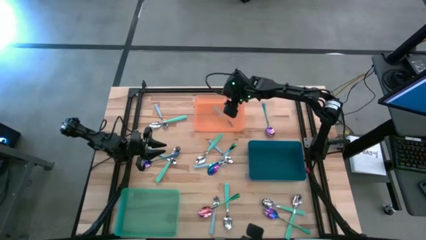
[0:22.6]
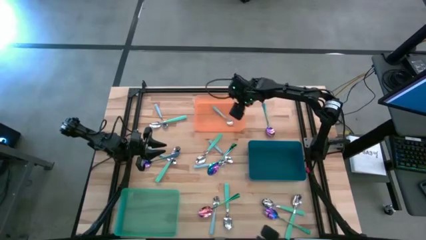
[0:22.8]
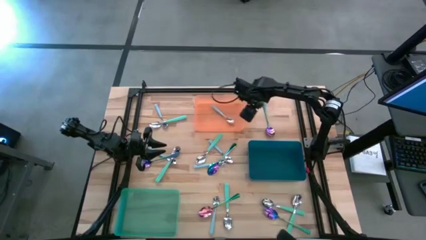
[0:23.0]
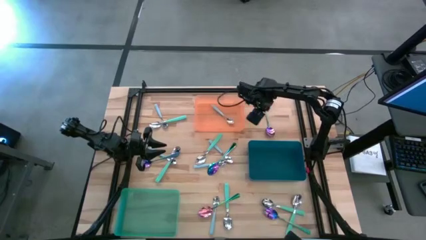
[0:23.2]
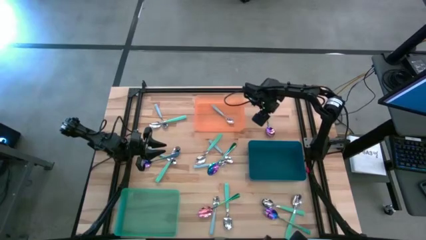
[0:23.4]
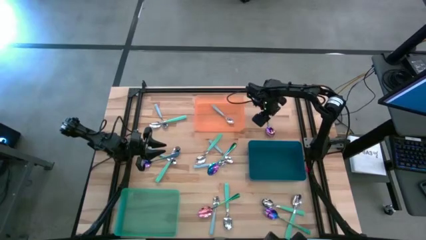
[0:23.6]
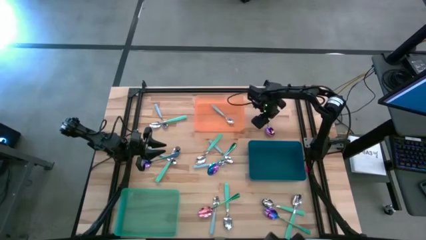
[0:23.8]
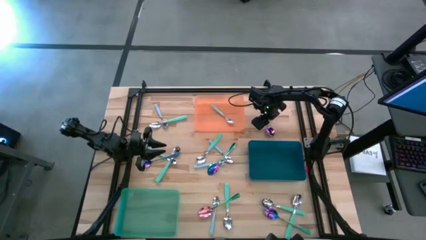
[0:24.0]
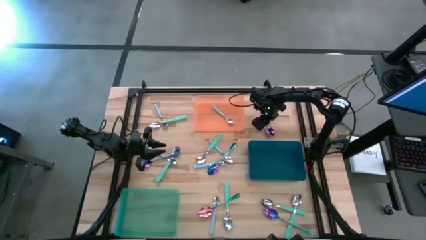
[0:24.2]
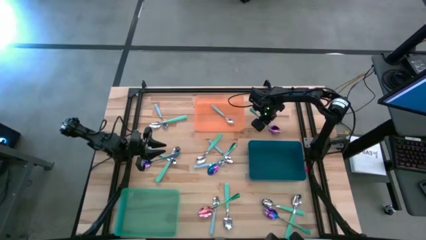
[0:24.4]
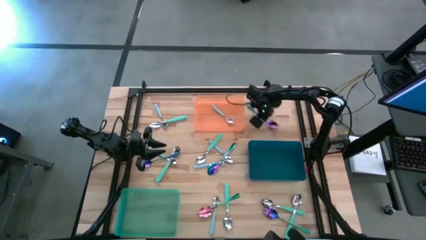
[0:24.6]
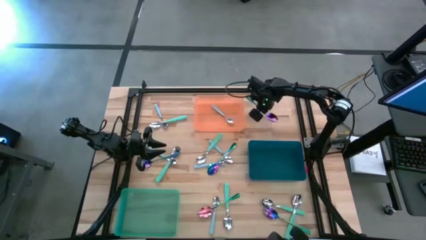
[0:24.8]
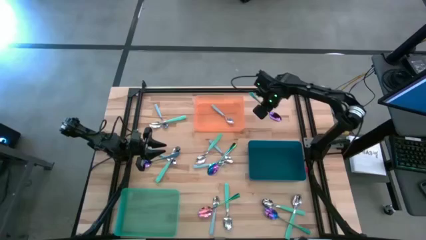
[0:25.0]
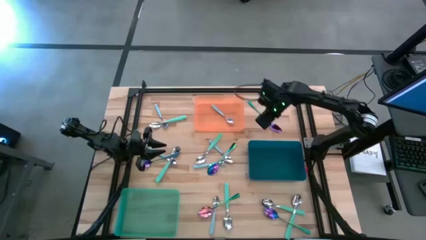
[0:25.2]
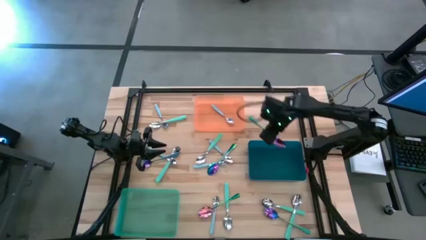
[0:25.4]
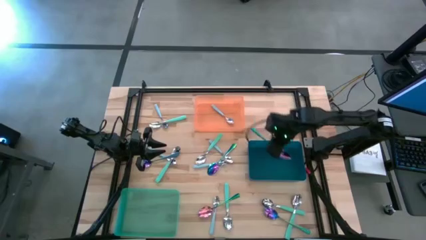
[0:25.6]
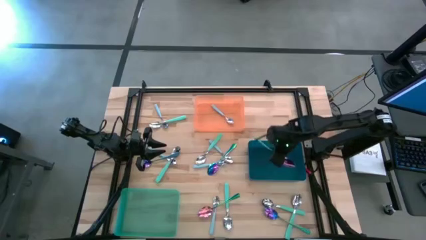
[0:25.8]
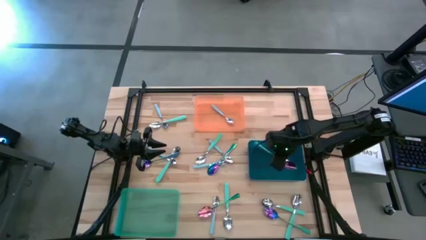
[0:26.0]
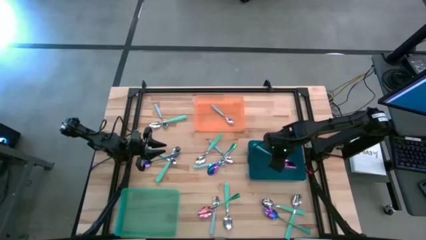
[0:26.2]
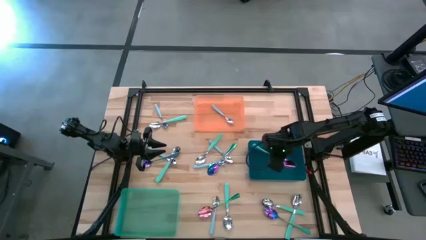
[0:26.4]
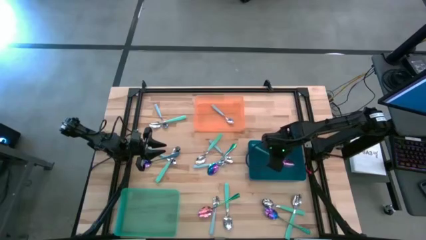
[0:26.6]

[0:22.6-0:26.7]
Task: Sort silverware by color (type)
Put the purple spoon into the blue bin

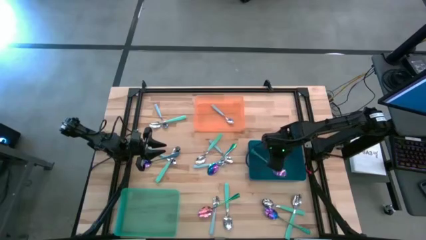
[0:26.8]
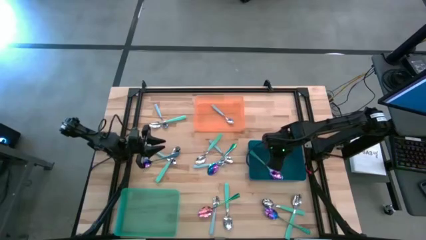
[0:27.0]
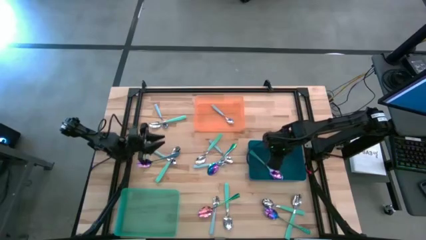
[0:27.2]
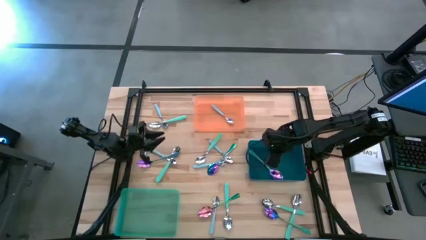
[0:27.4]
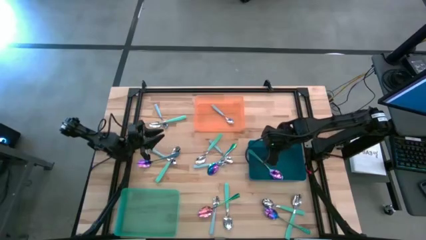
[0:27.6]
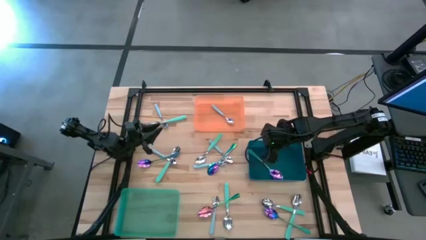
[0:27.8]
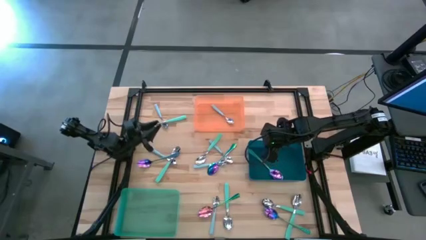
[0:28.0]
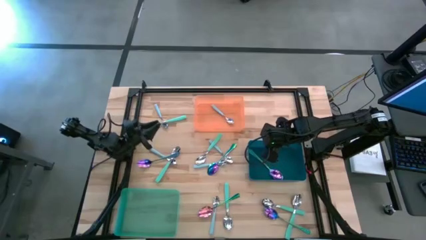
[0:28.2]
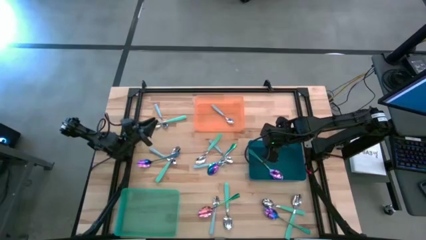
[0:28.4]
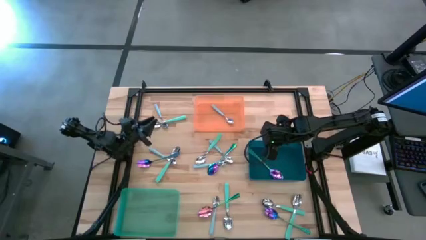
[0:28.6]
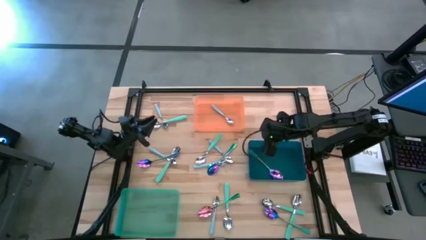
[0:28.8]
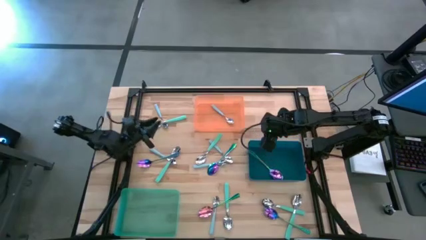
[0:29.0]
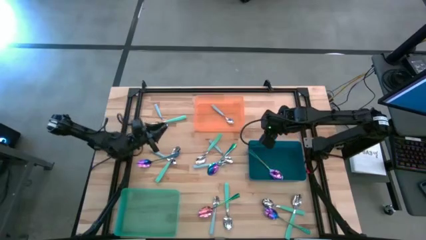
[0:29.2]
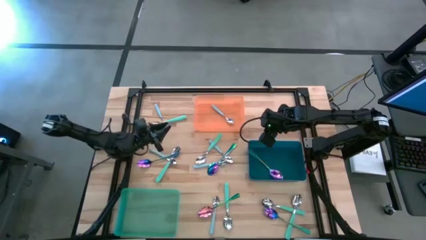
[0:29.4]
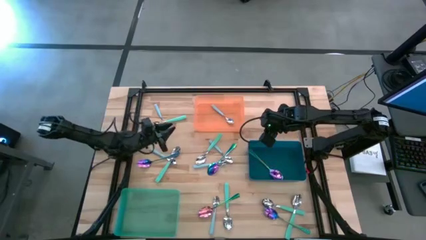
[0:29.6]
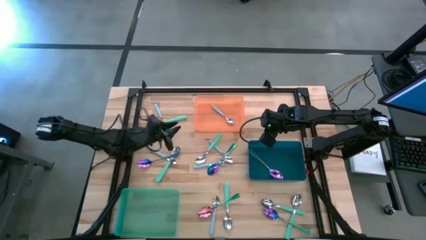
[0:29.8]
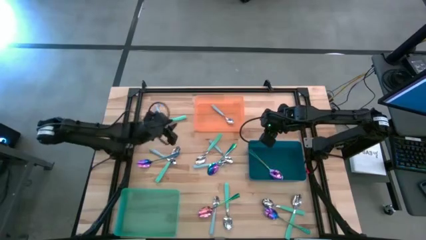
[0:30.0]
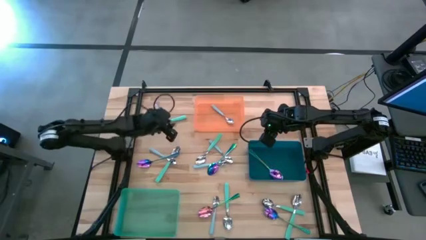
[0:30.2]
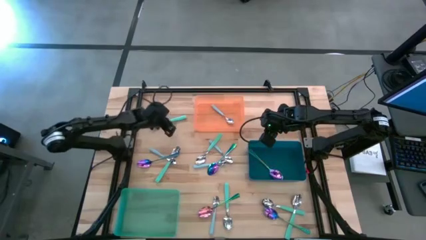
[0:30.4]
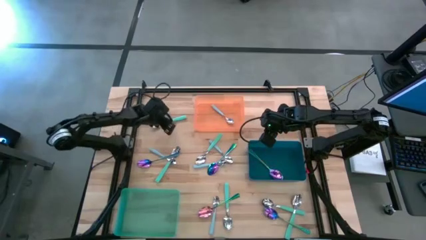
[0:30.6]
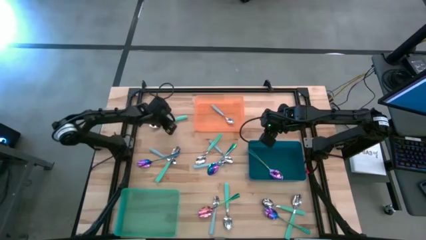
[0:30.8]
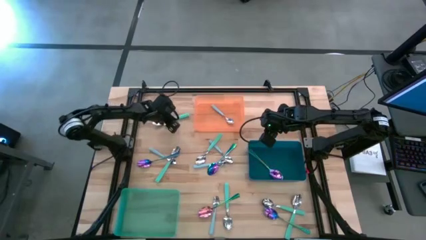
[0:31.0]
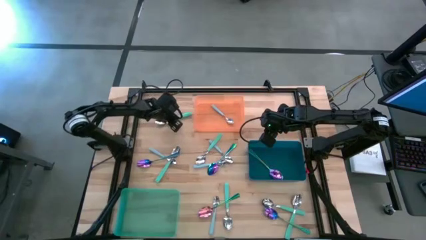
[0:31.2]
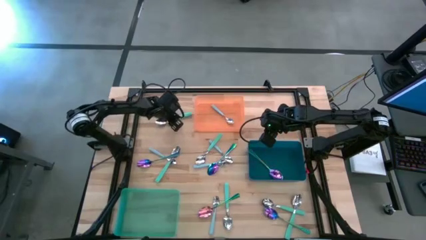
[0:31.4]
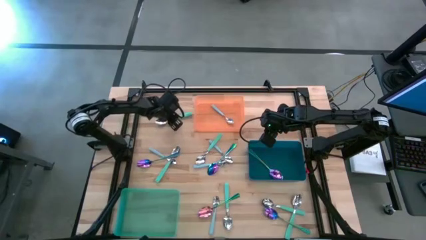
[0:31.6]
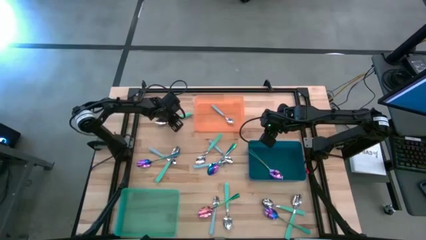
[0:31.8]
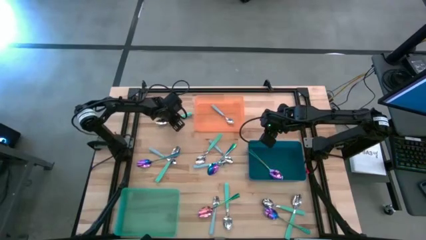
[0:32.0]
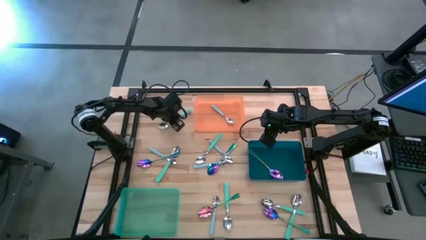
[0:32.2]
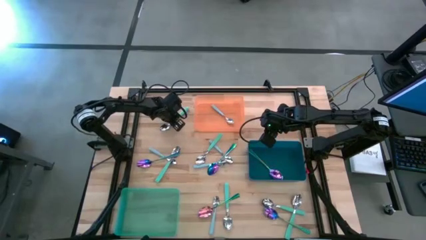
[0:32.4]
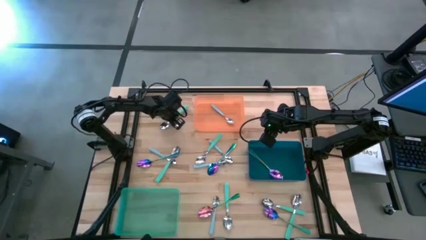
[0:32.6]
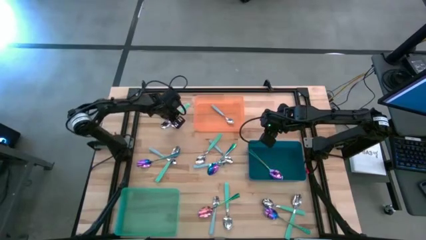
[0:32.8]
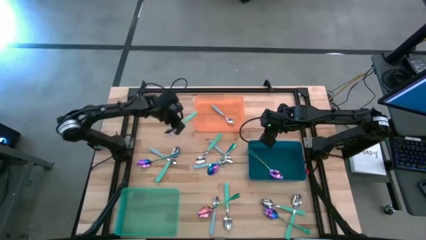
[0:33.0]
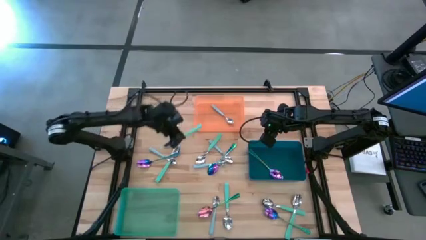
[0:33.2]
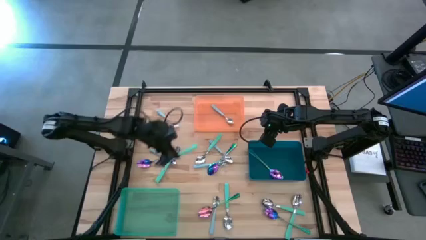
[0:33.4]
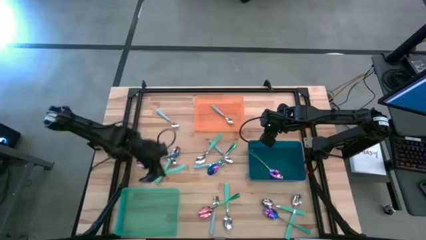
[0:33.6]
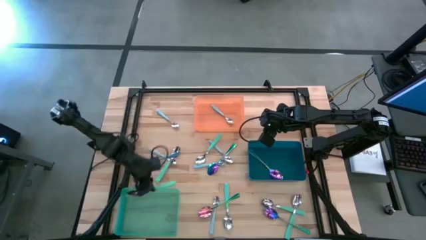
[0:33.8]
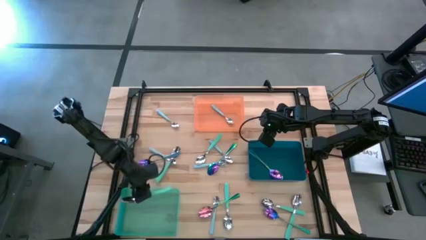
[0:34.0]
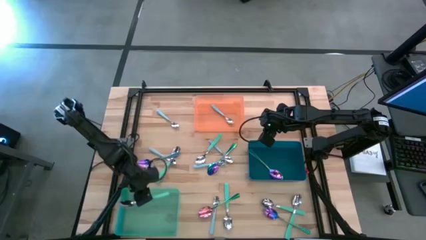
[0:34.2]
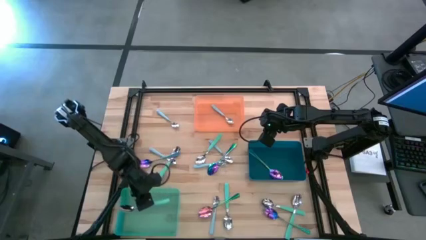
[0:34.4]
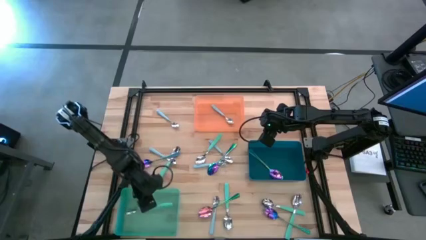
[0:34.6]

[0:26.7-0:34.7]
Put the green spoon into the green bin

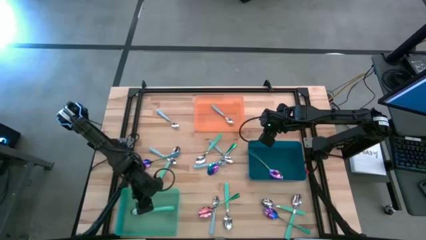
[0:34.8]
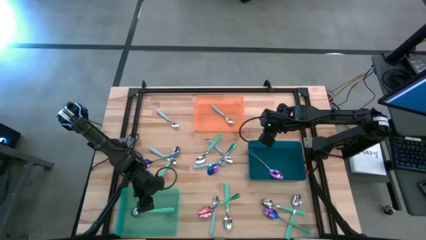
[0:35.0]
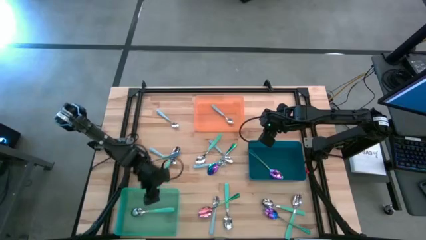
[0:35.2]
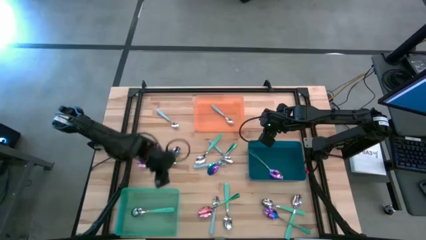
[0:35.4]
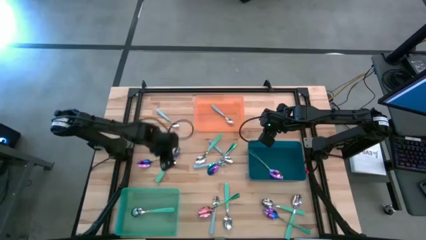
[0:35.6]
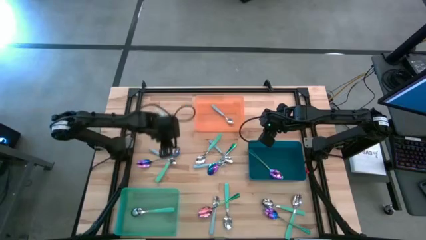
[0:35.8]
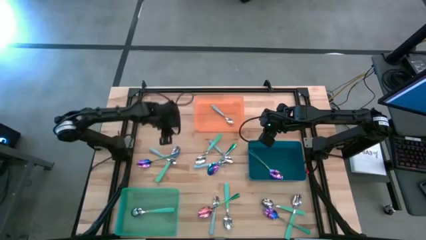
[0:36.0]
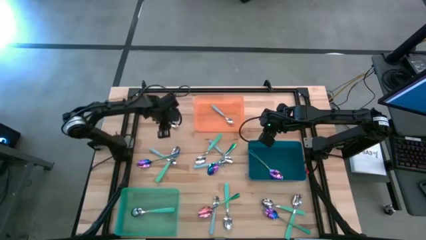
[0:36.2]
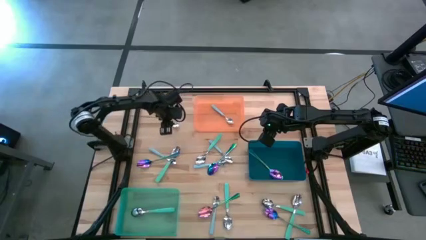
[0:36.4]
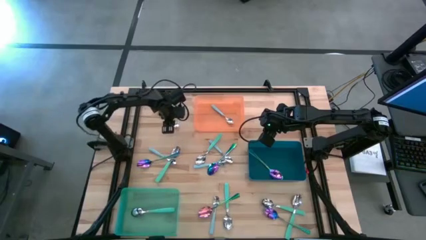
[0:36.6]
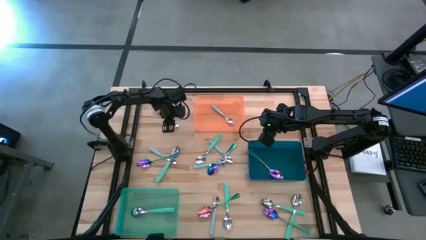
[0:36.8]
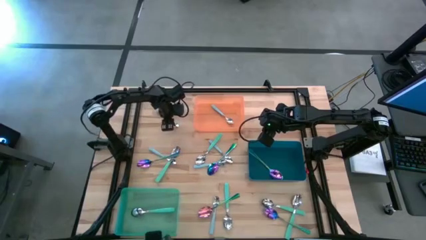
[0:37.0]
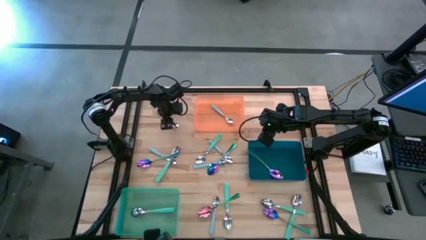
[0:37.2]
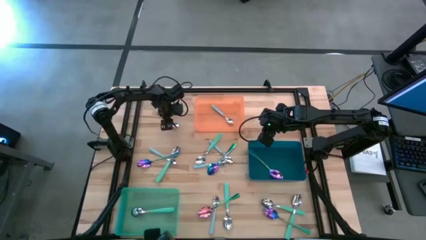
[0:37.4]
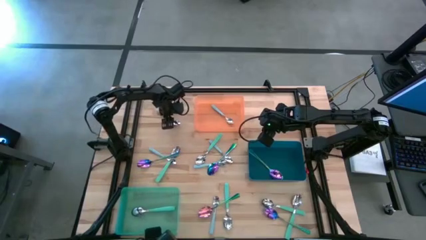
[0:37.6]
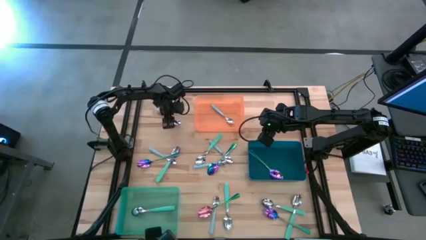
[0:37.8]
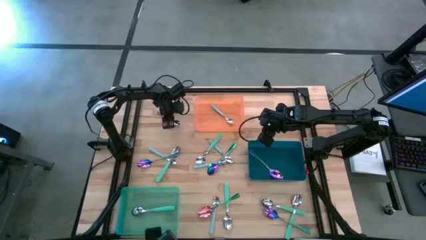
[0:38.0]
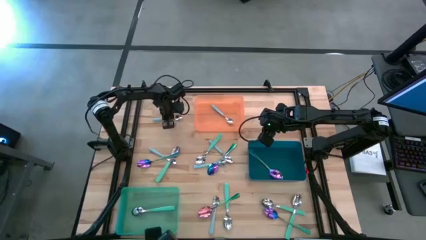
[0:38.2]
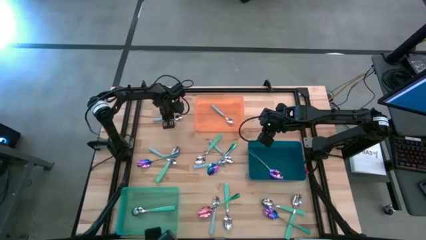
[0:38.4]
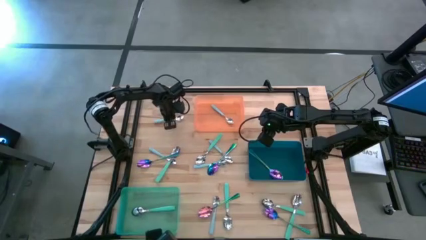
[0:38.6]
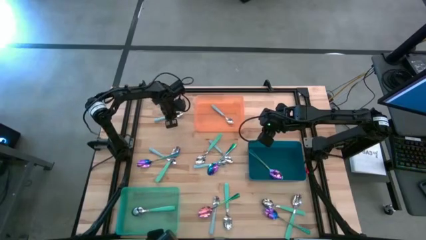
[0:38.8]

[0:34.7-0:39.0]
Put the blue spoon into the orange bin

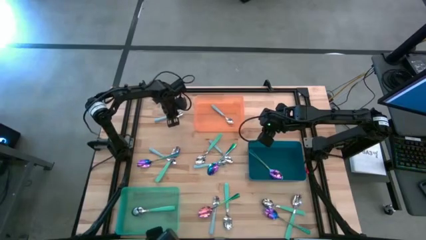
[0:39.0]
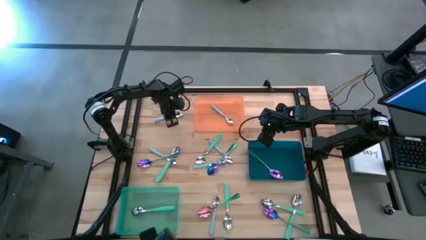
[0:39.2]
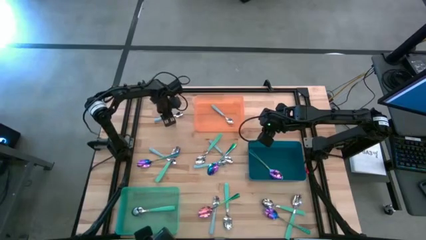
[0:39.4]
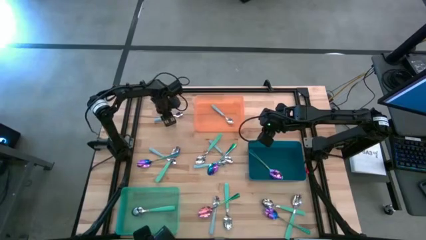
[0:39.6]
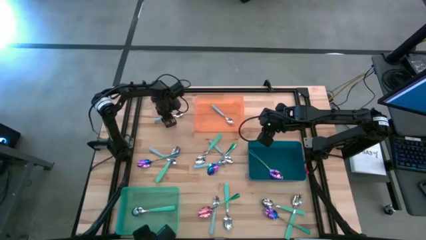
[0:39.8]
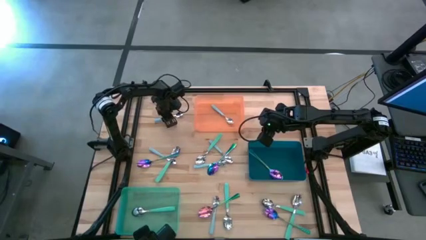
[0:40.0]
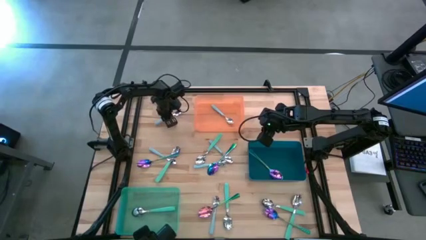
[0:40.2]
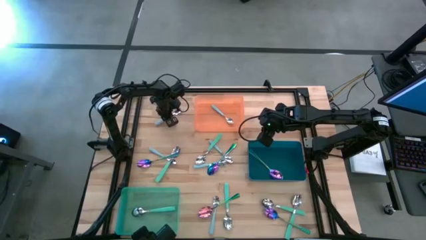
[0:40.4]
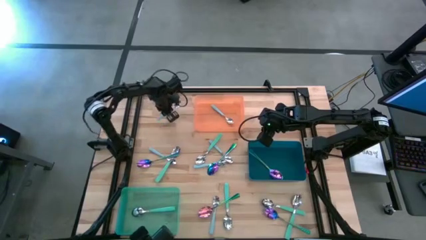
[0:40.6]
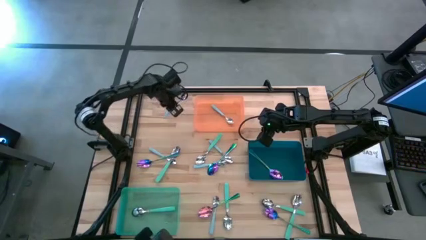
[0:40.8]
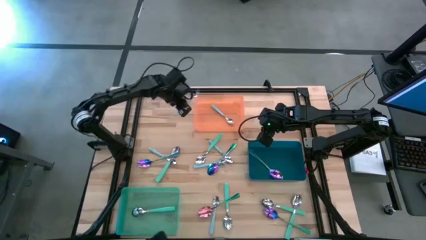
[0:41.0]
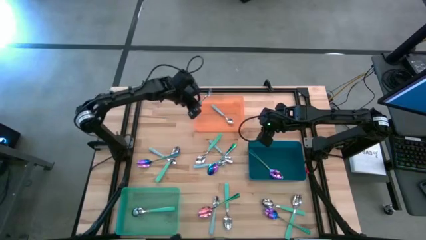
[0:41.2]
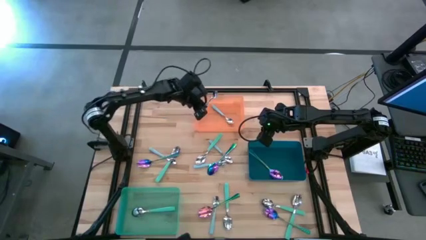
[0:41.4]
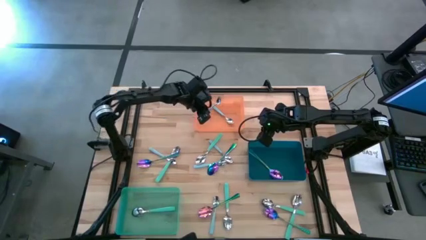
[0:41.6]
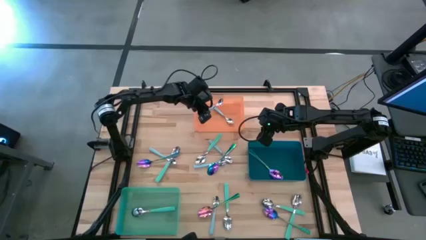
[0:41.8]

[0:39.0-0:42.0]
Put the blue spoon into the orange bin
